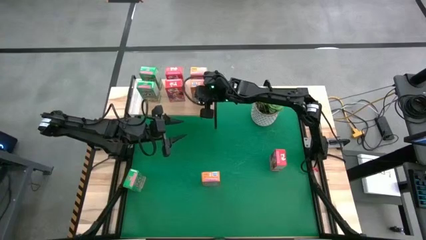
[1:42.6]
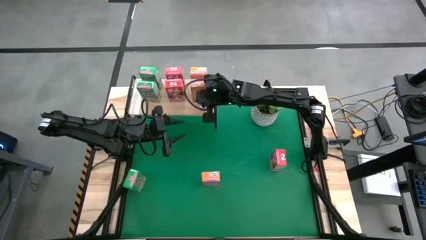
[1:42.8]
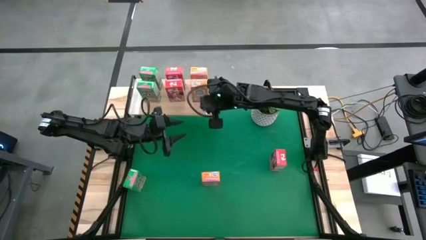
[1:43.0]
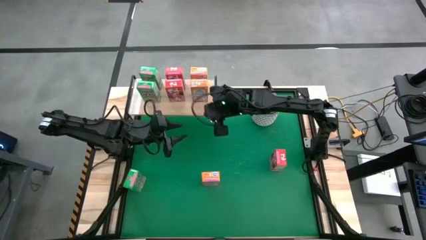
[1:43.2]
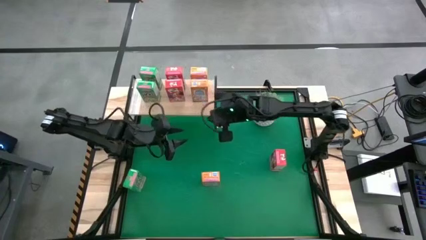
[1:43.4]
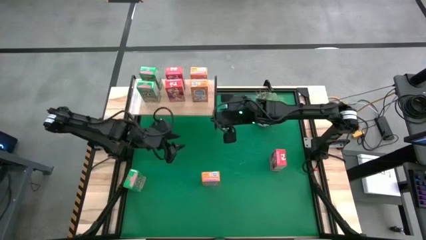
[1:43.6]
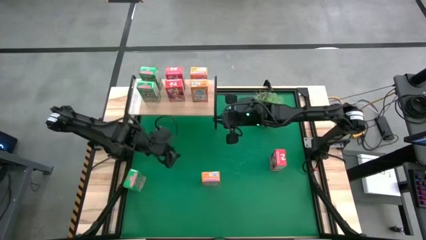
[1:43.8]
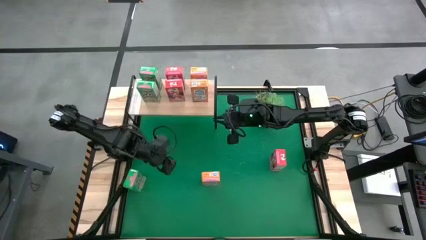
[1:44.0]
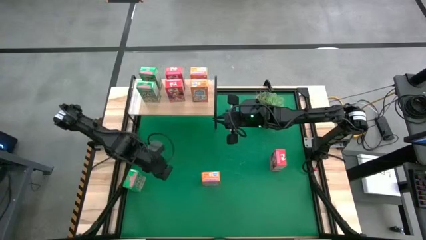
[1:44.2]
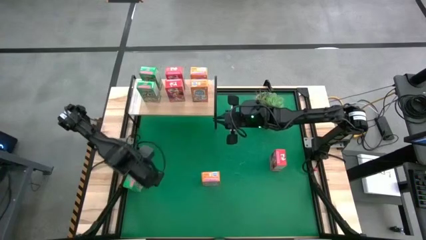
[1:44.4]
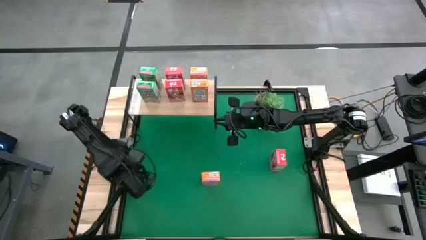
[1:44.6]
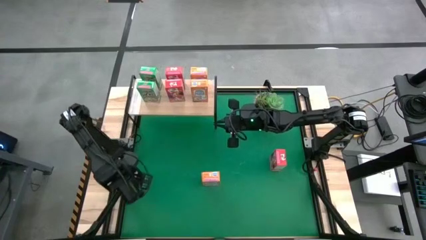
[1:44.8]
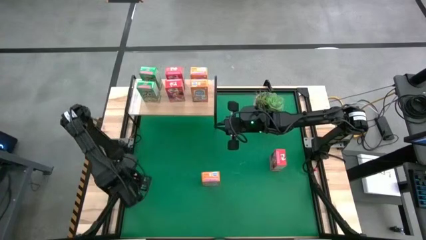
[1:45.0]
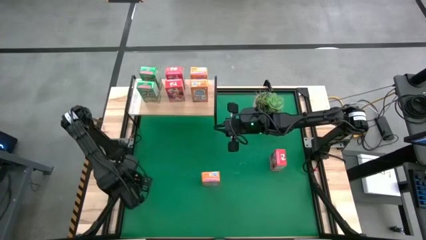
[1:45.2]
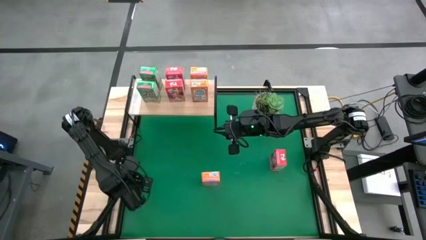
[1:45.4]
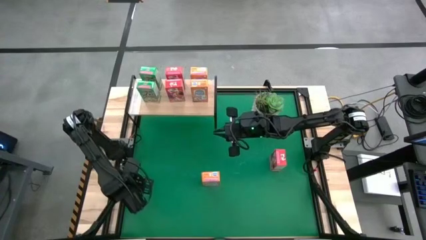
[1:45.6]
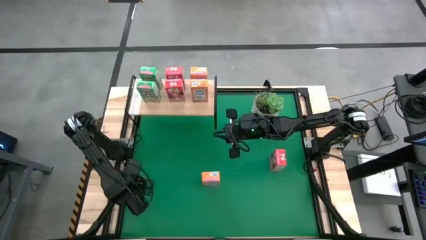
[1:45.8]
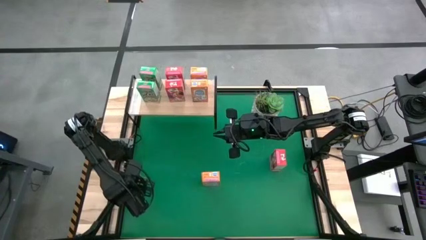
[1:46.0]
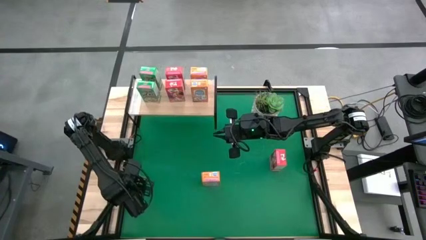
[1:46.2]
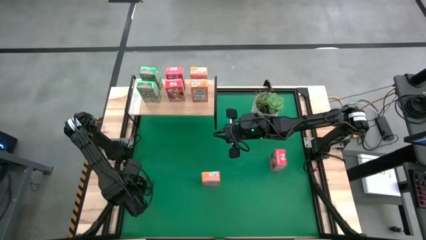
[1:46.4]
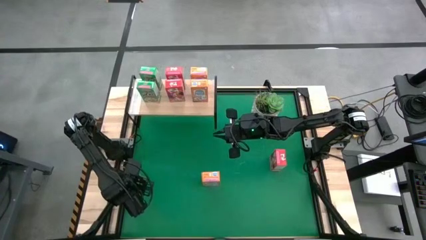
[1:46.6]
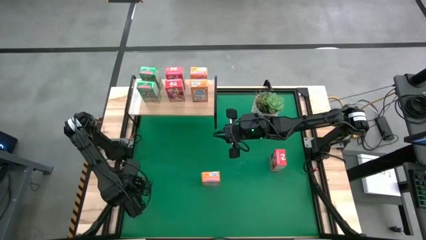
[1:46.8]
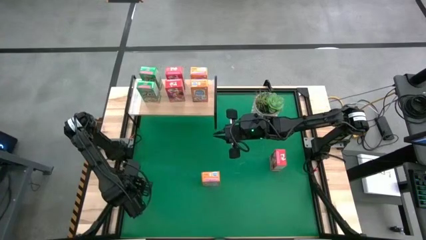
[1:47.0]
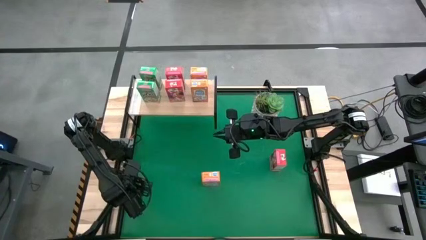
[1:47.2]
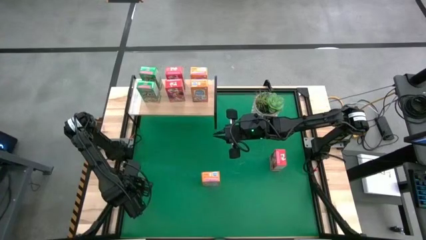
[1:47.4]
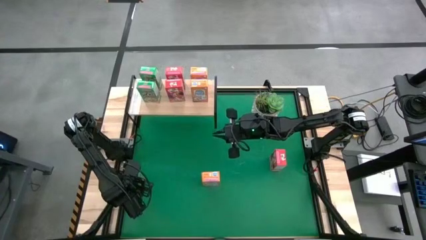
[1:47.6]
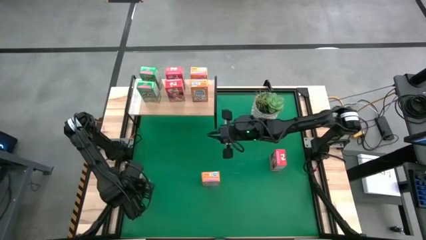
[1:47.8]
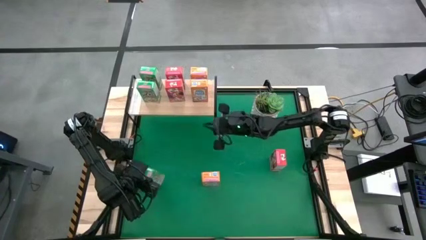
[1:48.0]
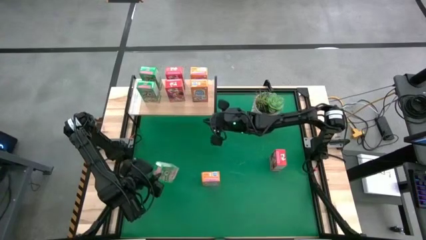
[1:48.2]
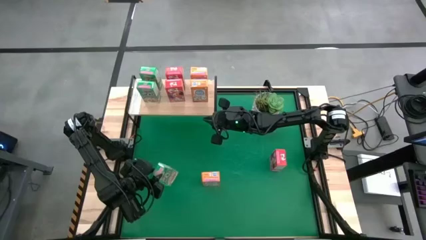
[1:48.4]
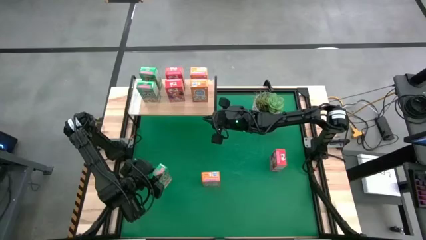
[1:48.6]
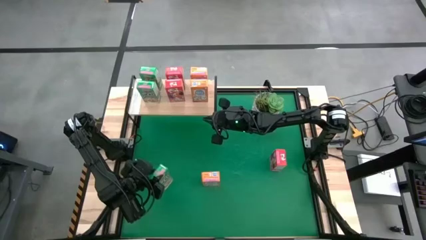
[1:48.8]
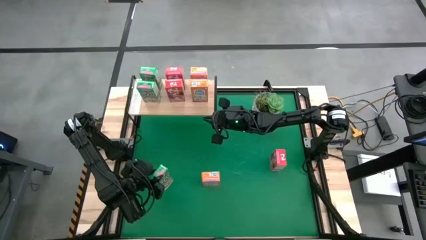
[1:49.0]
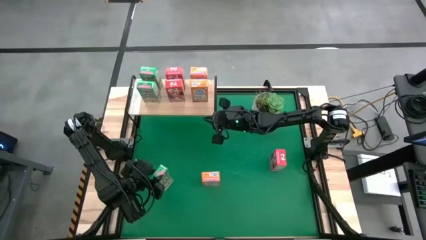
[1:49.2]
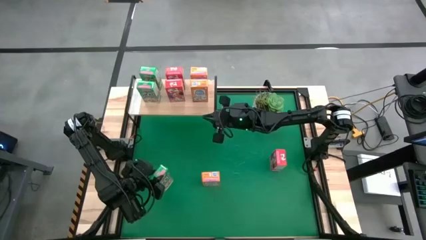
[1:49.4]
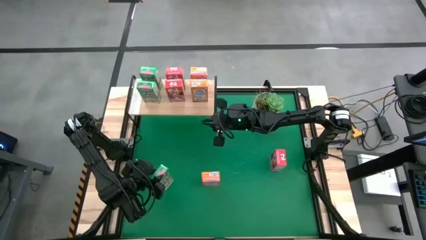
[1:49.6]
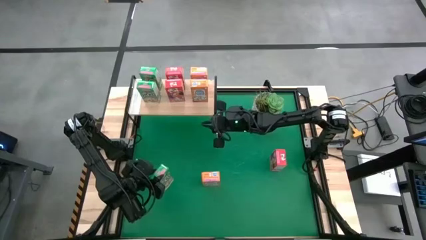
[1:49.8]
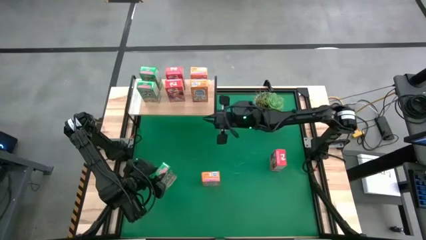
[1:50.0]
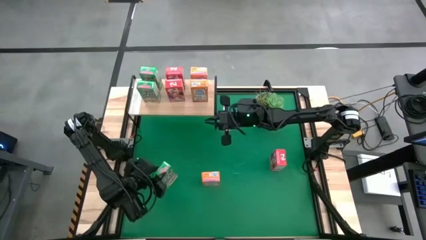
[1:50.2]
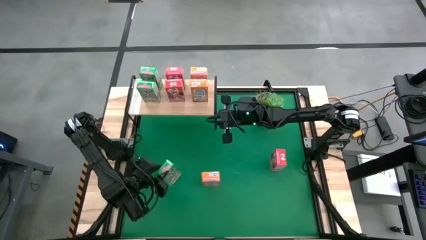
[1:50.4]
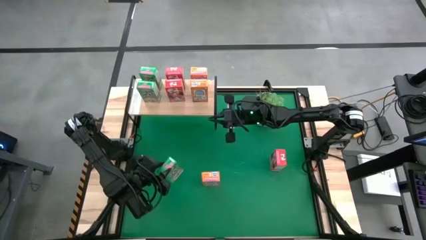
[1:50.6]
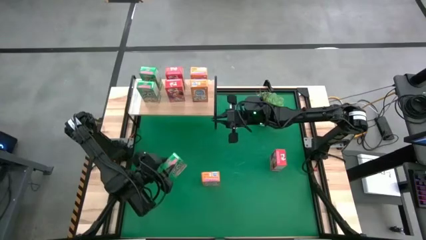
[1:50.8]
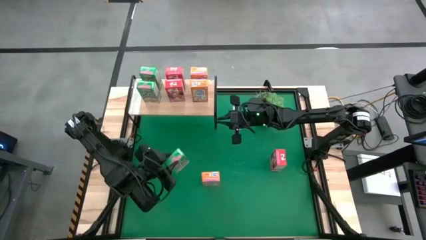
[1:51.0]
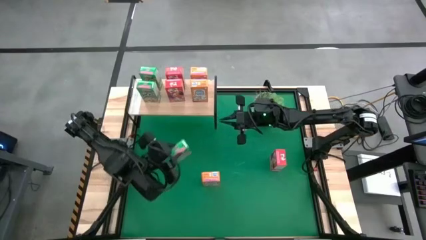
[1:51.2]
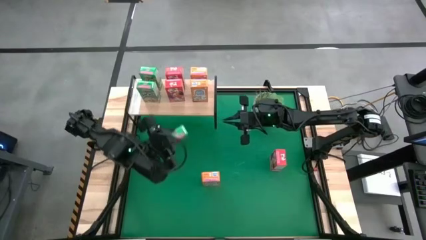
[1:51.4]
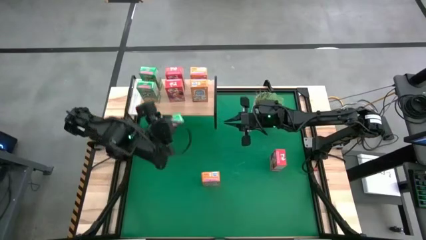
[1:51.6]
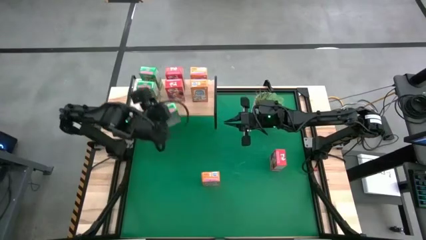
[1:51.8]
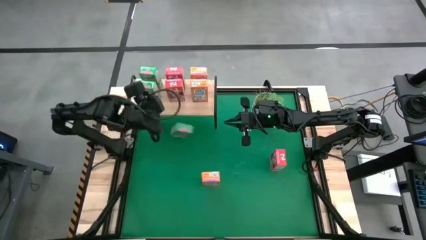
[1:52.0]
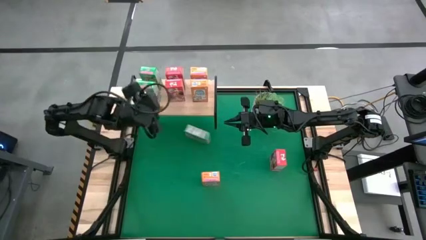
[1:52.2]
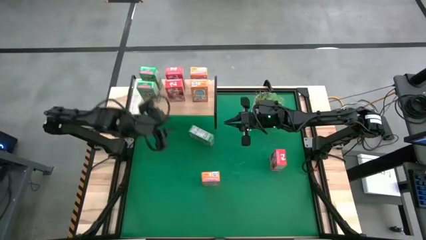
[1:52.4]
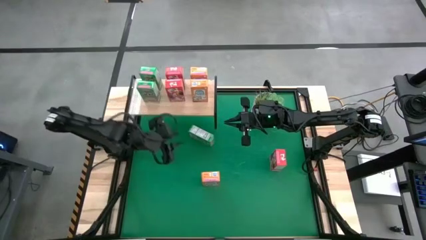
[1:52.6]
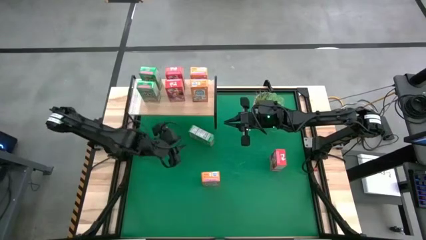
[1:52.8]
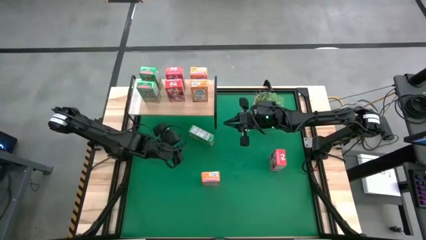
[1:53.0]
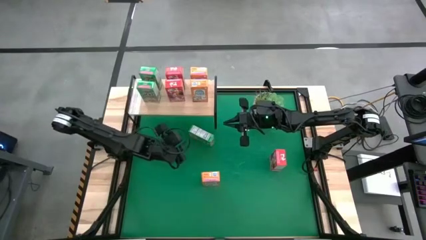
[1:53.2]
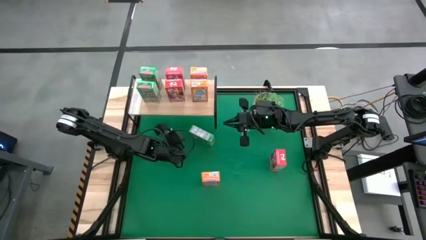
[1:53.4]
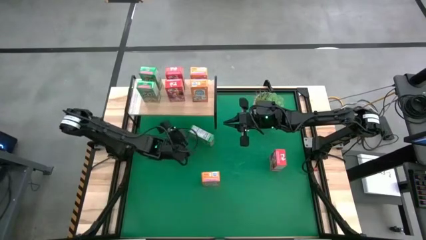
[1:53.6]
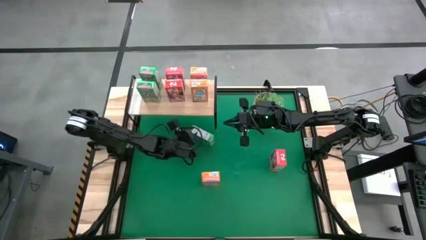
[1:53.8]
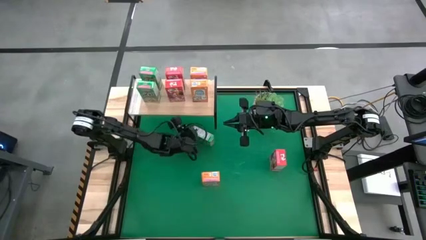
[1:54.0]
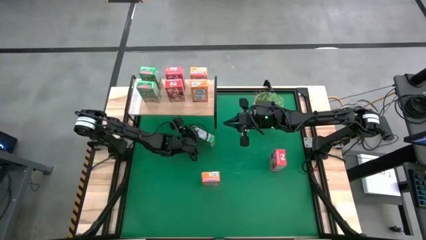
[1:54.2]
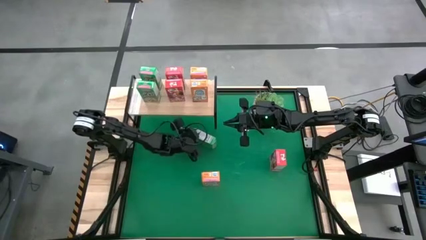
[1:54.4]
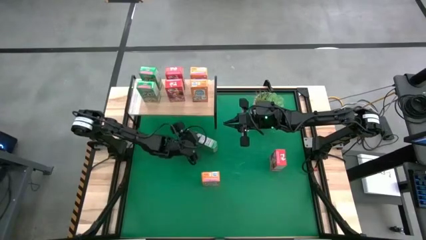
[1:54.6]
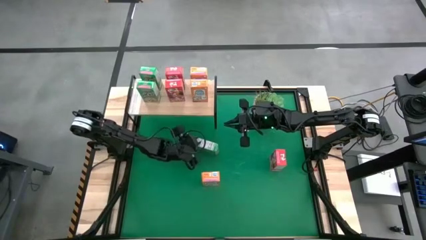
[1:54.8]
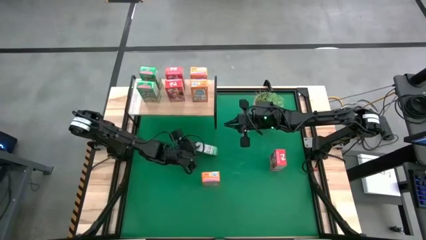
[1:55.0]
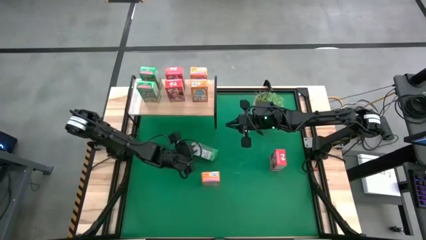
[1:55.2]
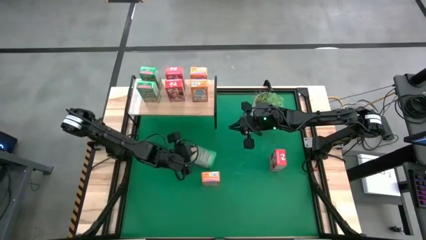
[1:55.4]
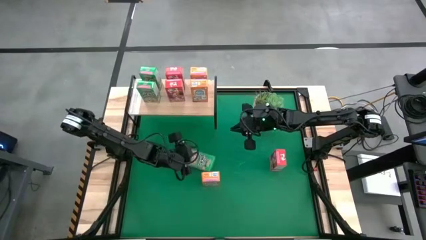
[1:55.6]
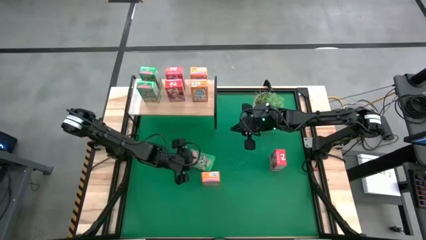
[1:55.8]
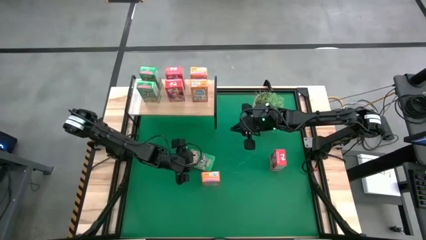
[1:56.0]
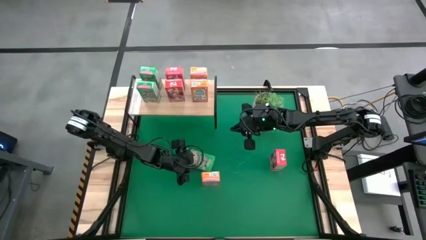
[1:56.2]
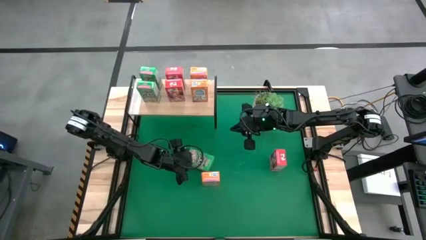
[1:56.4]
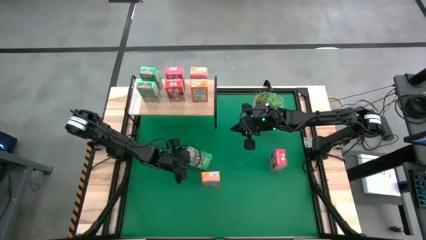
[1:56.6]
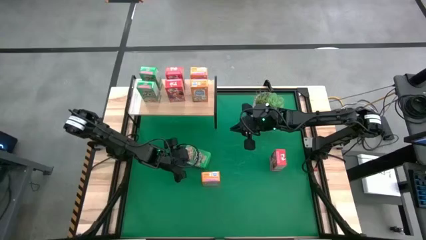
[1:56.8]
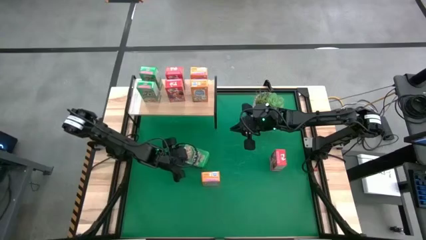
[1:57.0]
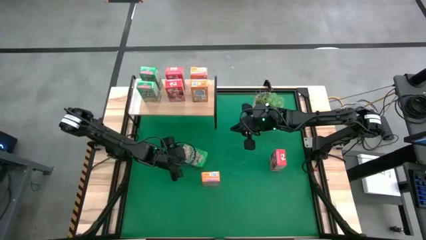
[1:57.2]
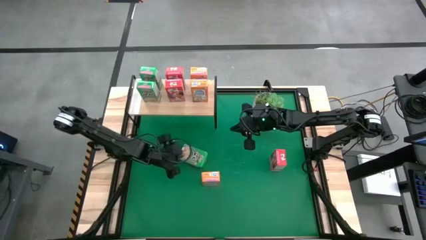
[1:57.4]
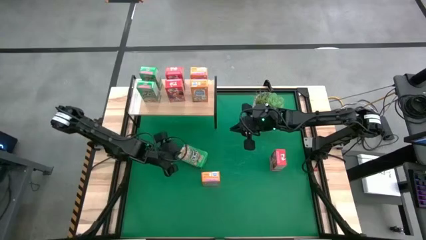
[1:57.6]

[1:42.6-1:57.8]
Task: Stack cereal on shelf
Put the green cereal box on the shelf aligned with other green cereal boxes

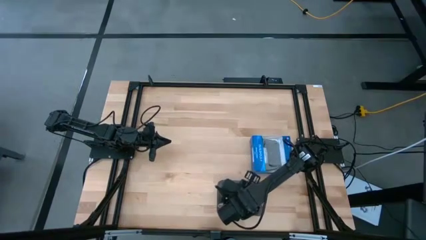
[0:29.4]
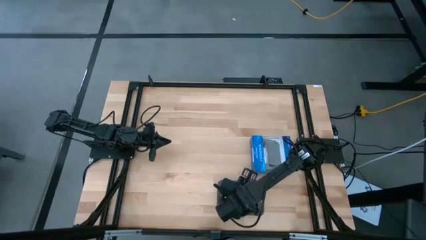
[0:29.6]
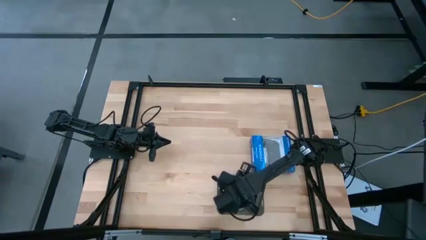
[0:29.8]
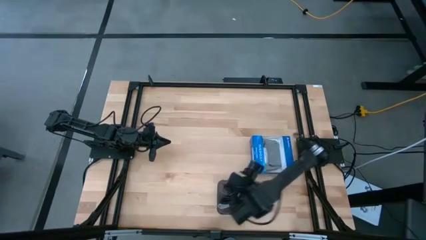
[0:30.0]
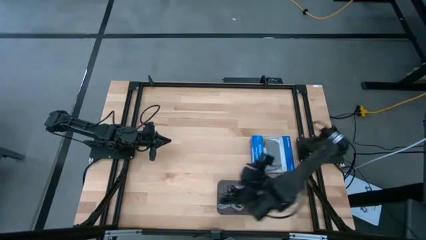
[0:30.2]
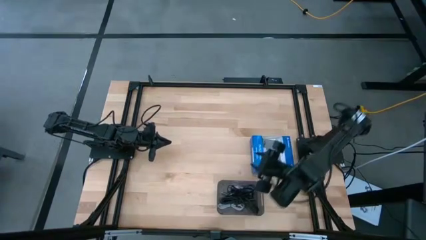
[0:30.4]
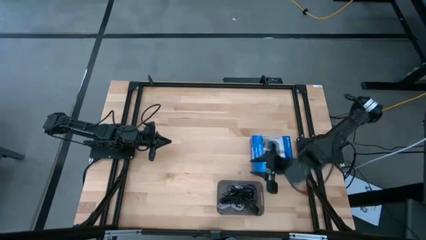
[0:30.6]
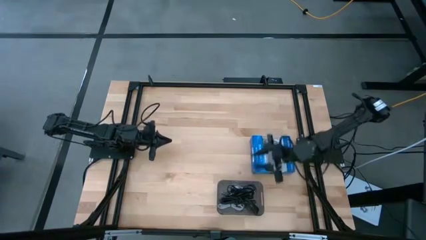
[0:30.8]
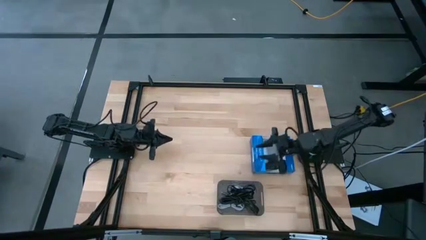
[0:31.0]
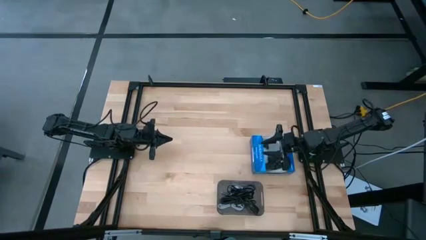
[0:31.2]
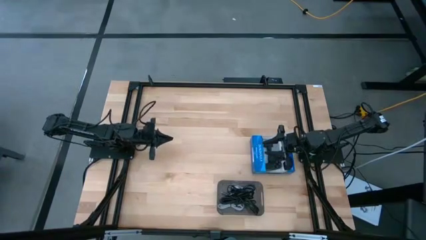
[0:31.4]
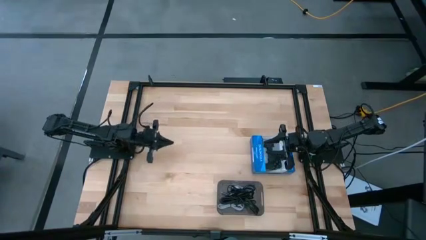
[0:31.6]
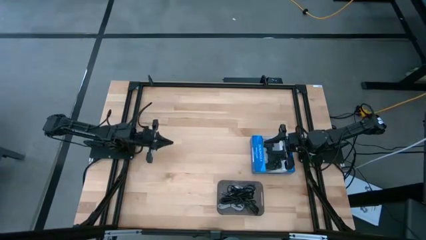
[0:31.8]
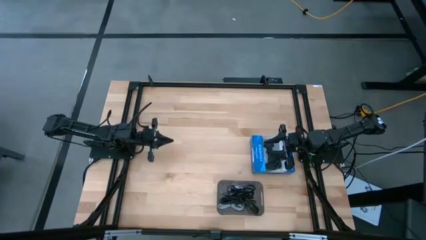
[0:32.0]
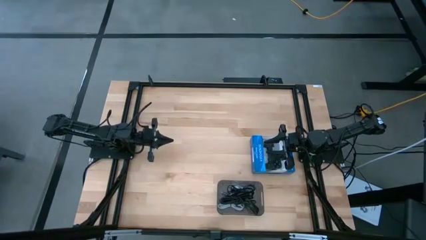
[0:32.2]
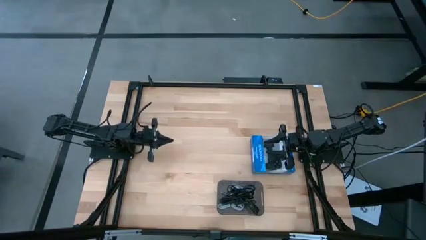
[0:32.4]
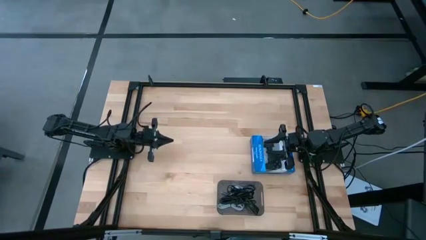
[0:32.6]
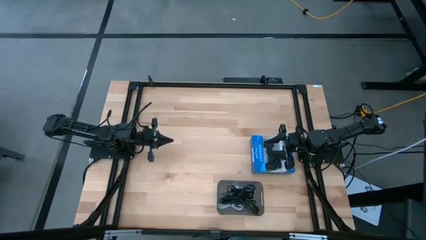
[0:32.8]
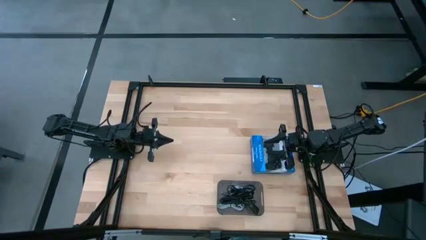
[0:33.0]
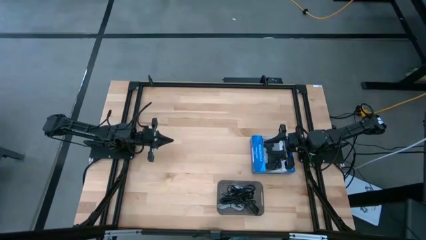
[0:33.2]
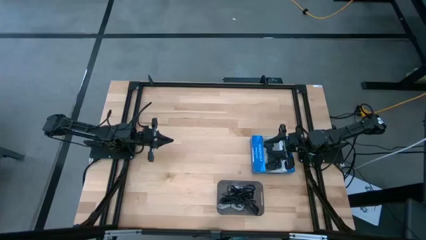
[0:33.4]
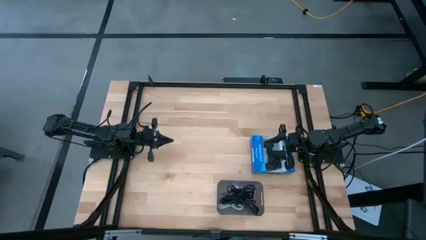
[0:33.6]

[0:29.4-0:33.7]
Task: Pick and place USB-C Cables
Return to Home Position
